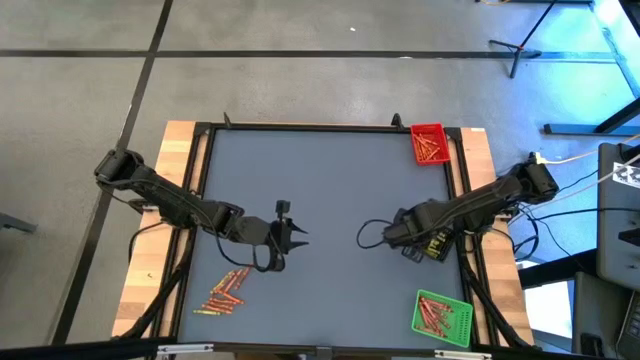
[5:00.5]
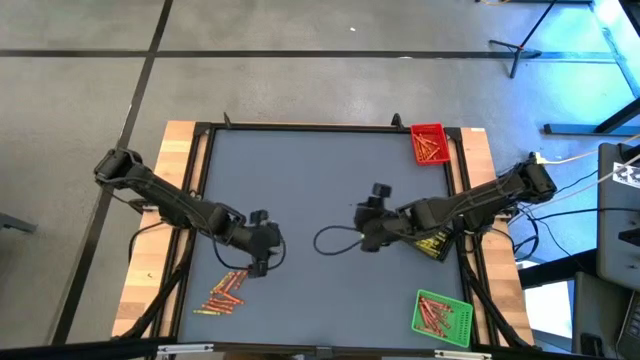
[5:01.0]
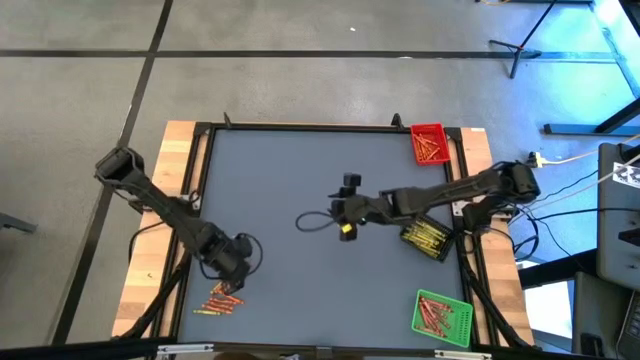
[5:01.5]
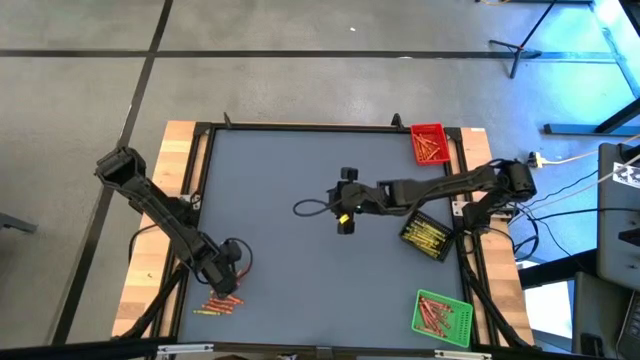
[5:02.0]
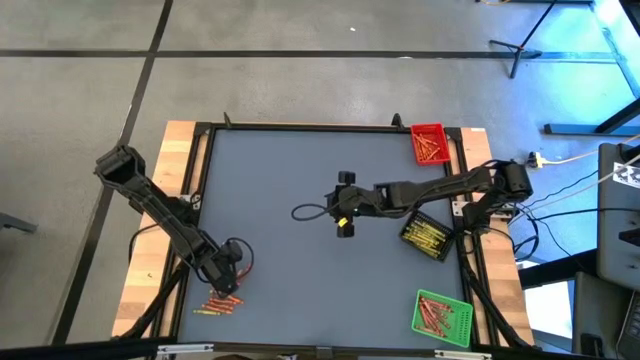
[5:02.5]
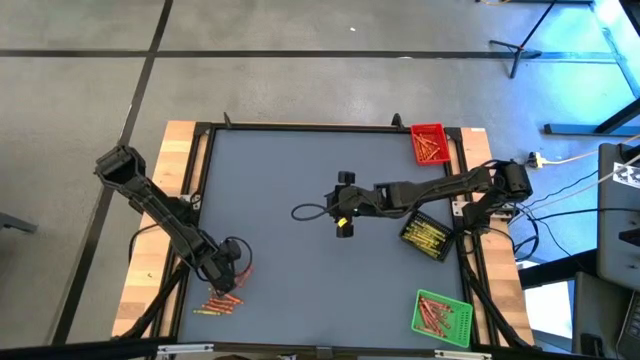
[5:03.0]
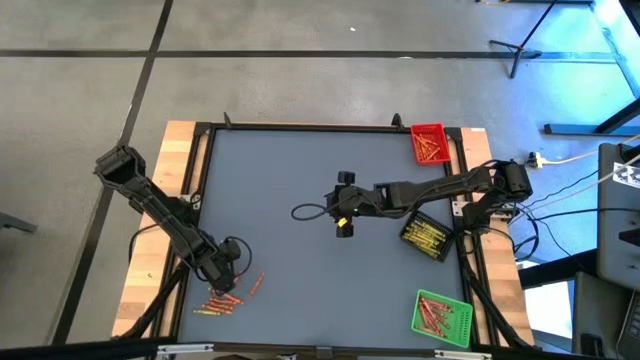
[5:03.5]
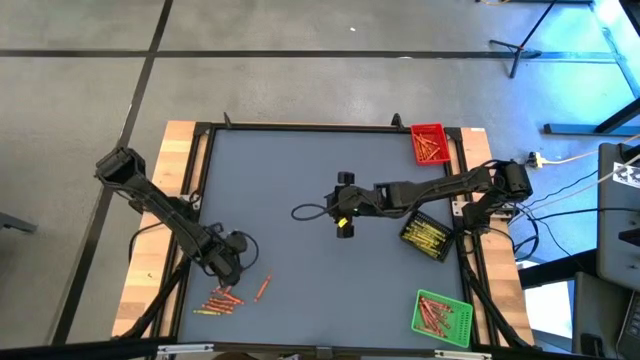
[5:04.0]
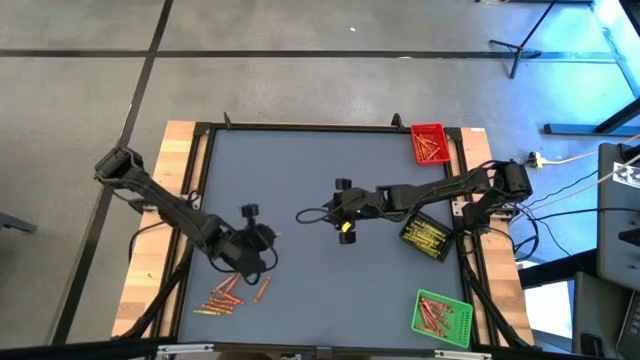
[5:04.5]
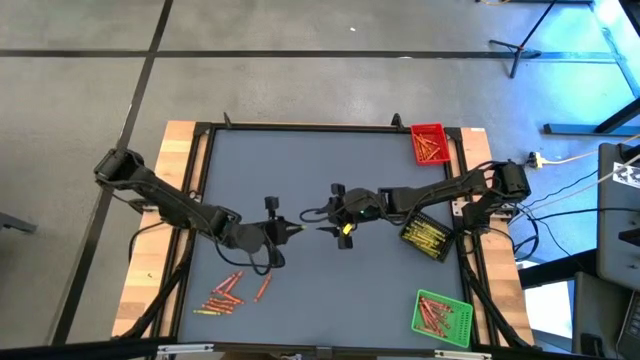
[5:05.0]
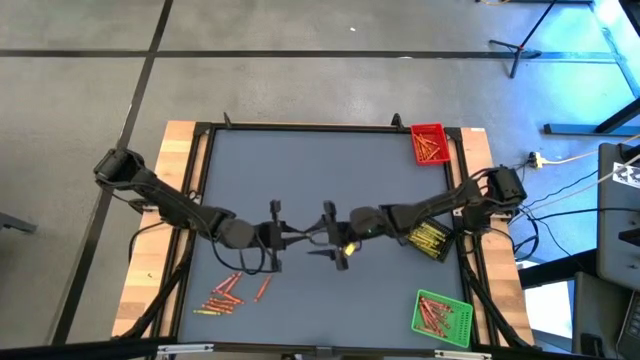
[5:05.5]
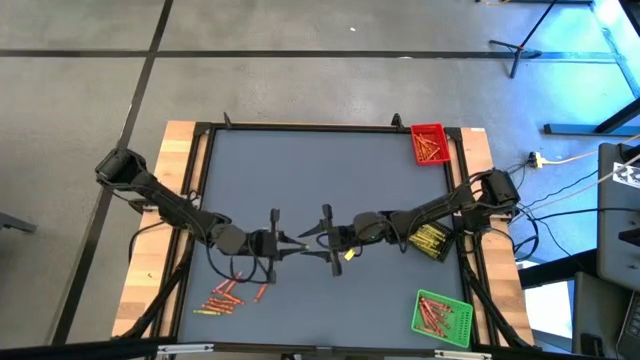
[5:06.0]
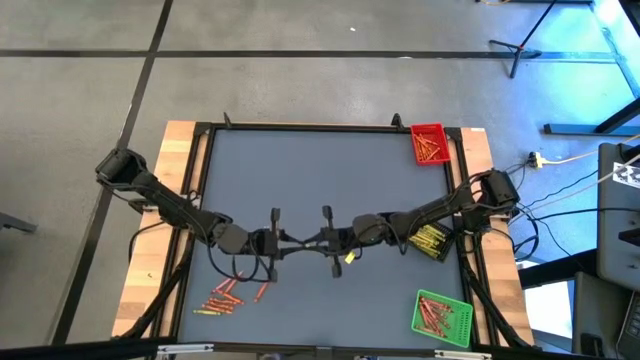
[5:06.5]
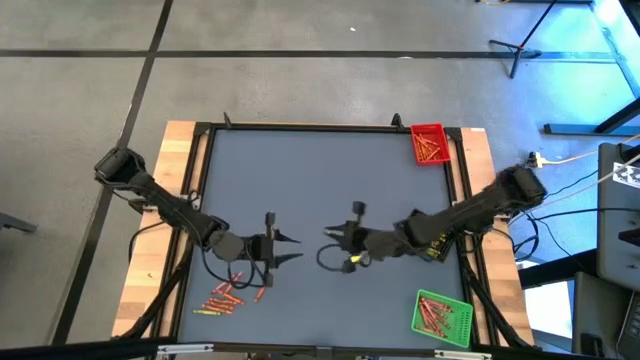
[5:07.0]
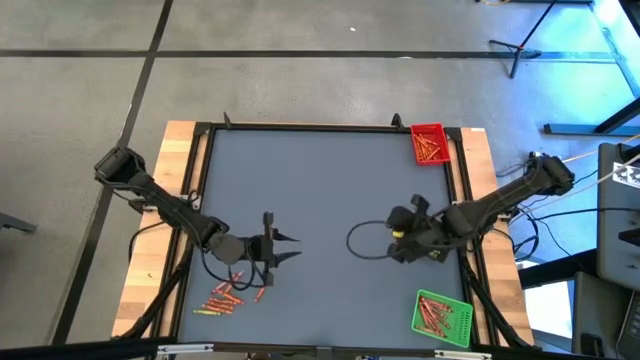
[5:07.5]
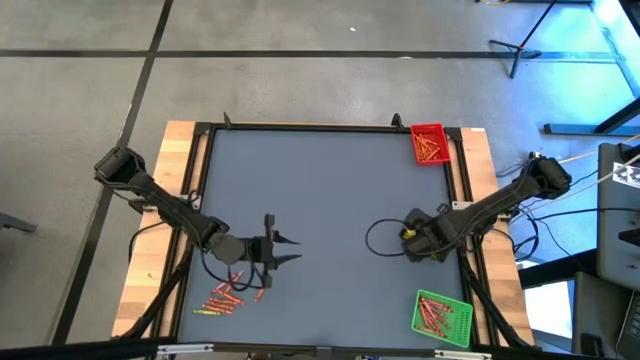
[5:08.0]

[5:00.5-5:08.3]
Task: Sort crayons
Put the yellow green crayon into the black basket

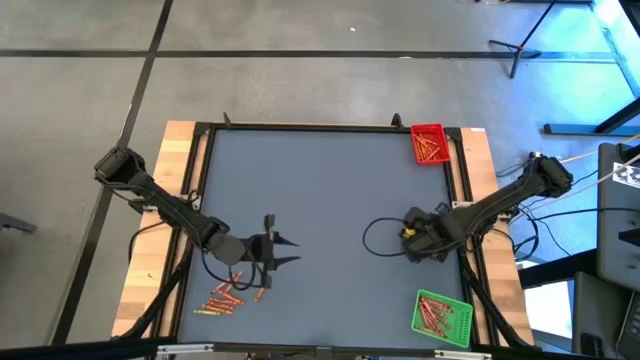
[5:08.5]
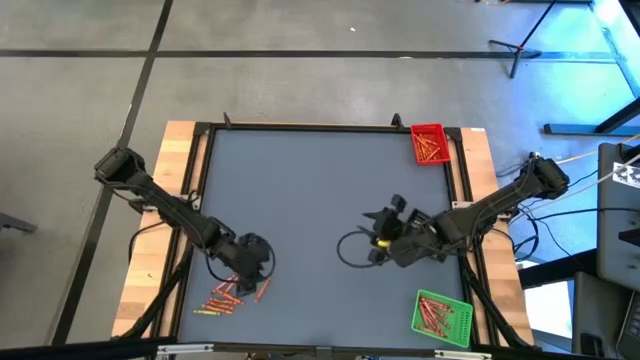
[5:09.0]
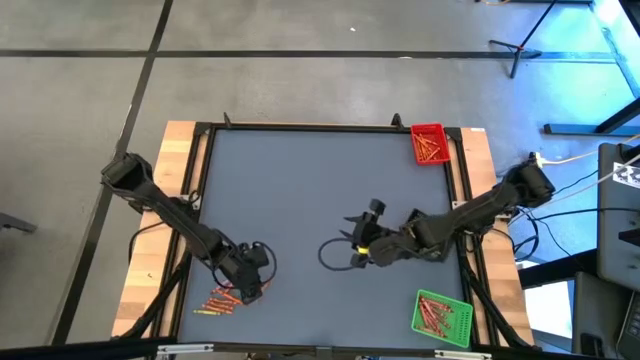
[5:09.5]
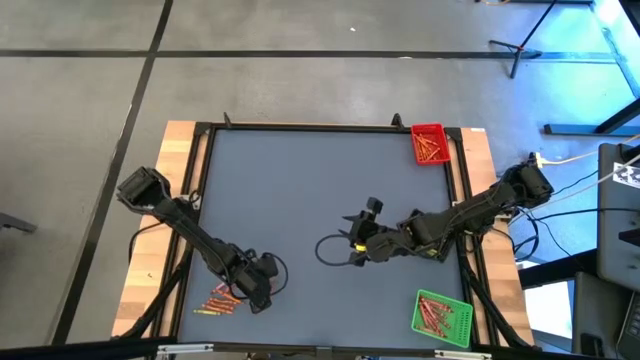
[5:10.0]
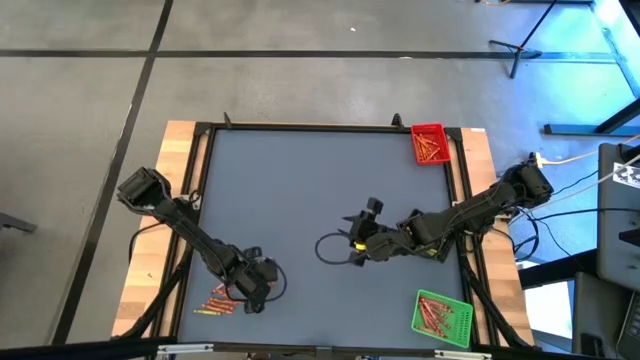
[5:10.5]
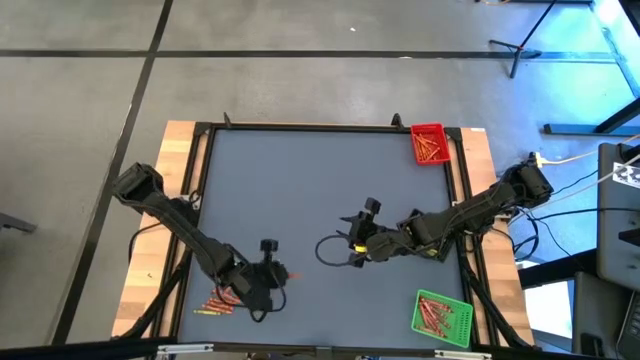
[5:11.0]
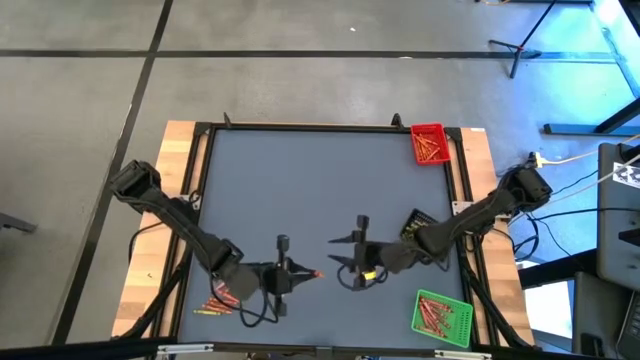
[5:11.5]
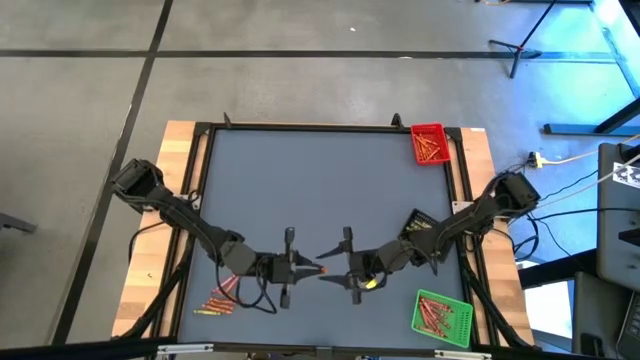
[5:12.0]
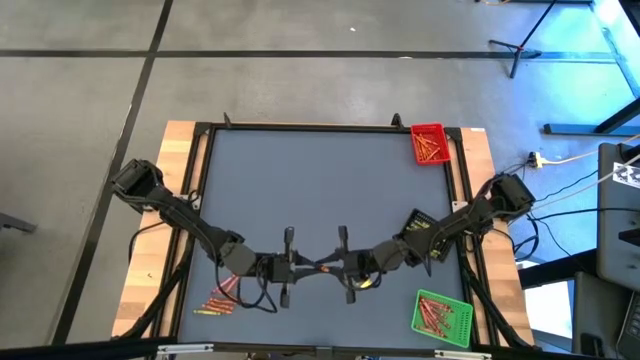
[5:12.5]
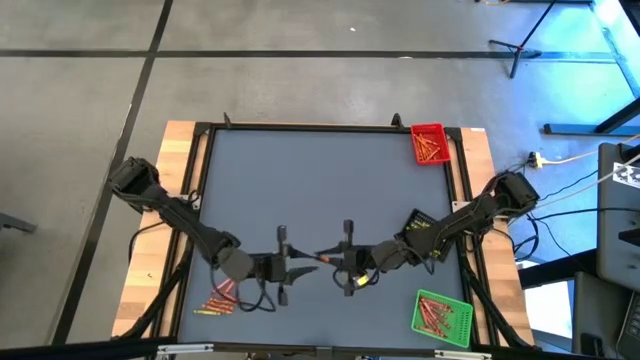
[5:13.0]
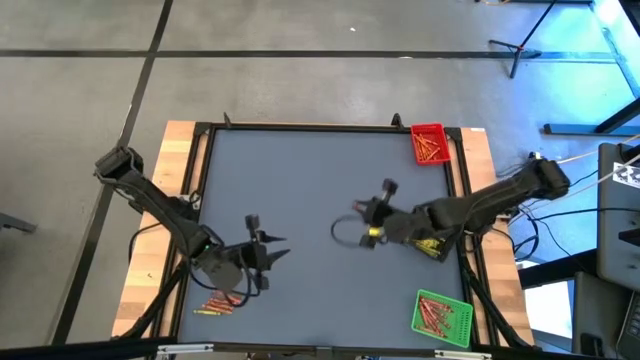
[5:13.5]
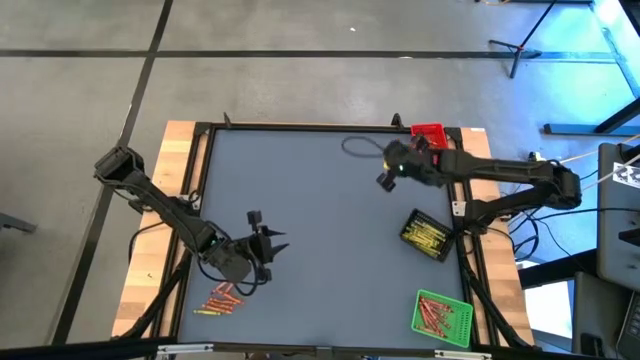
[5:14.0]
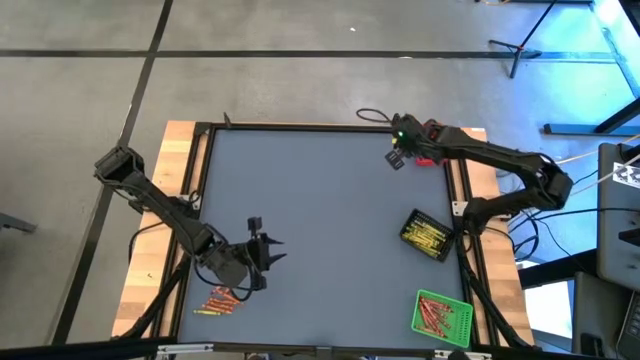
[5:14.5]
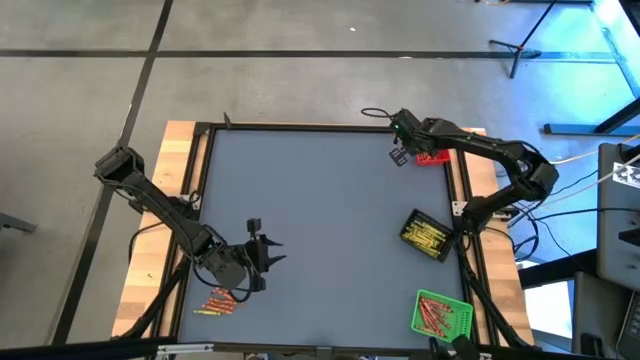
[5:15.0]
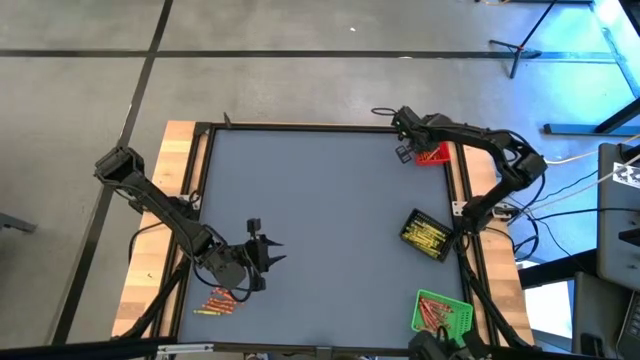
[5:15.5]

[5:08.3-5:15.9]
Put the orange crayon into the red basket

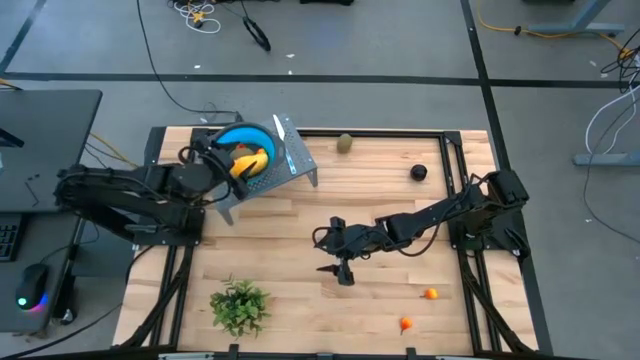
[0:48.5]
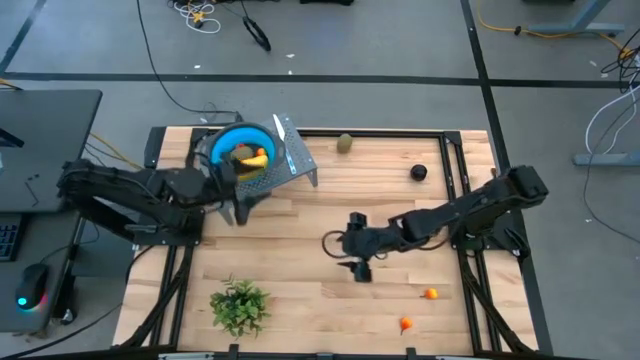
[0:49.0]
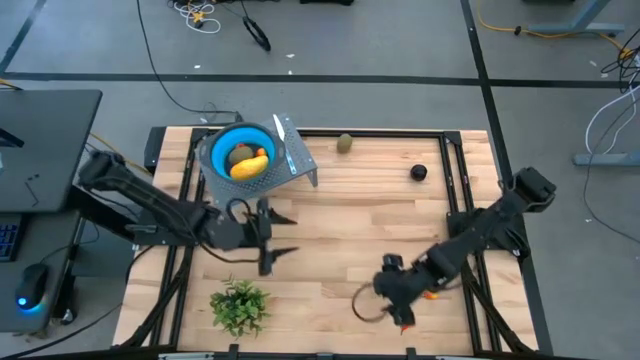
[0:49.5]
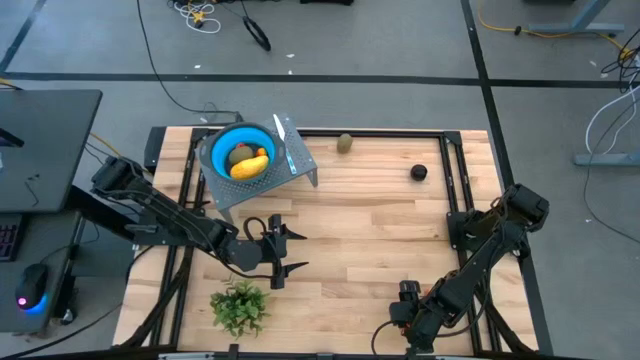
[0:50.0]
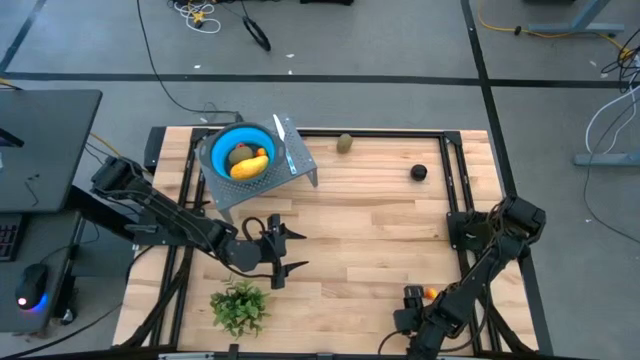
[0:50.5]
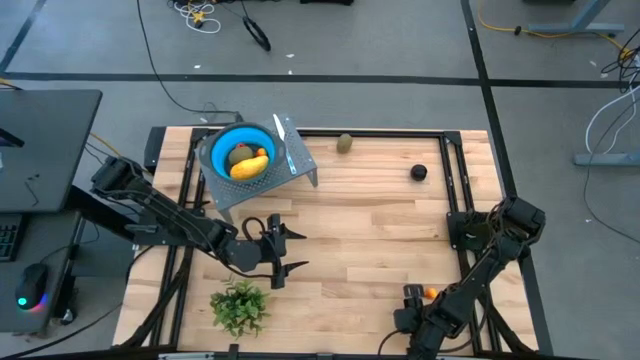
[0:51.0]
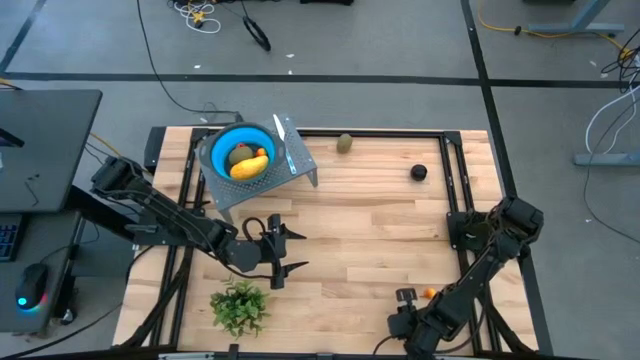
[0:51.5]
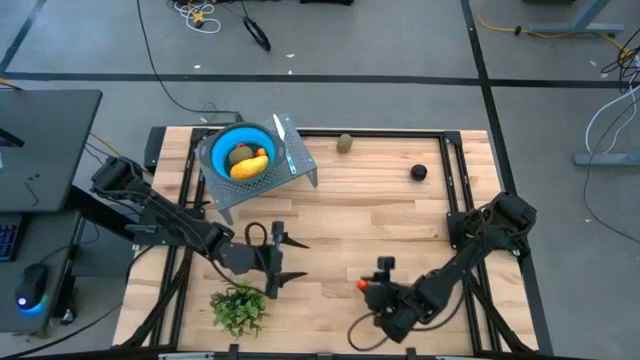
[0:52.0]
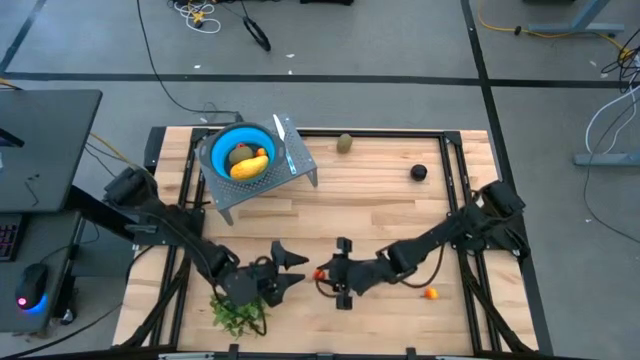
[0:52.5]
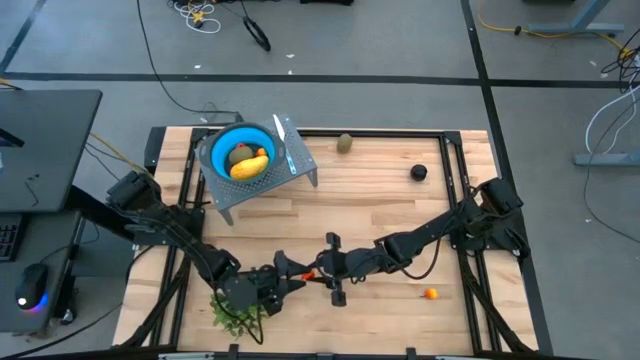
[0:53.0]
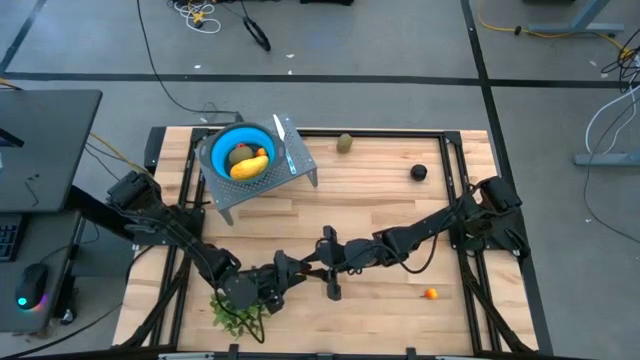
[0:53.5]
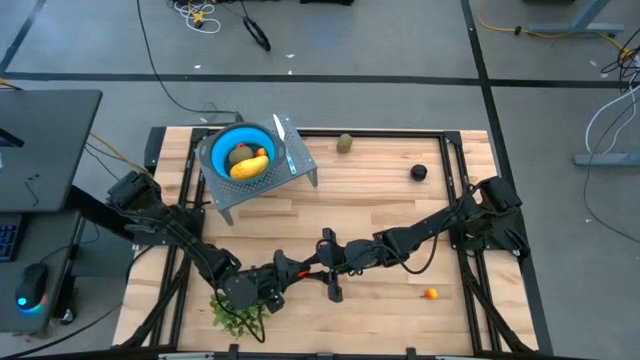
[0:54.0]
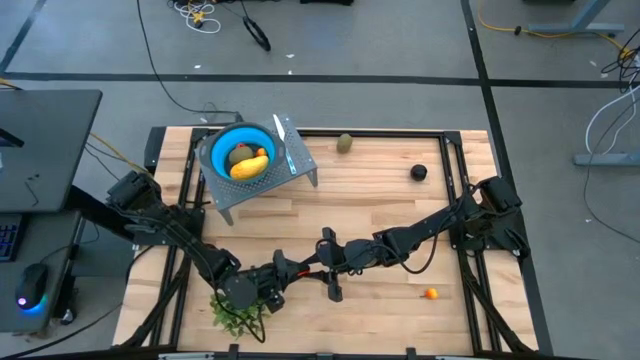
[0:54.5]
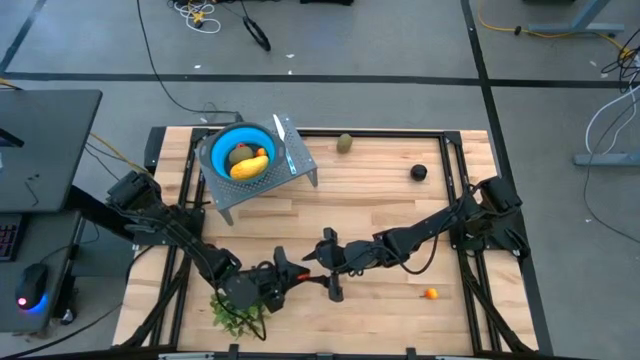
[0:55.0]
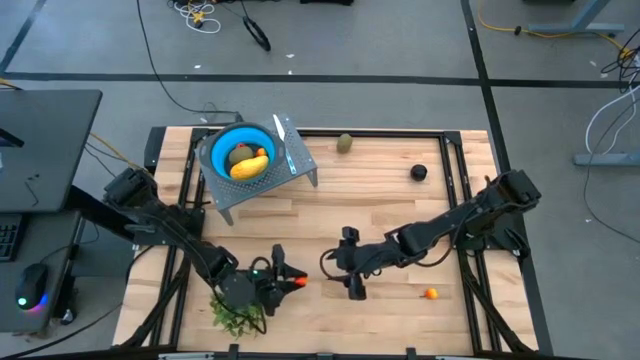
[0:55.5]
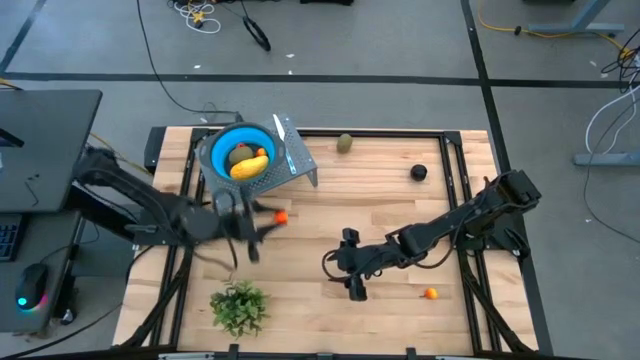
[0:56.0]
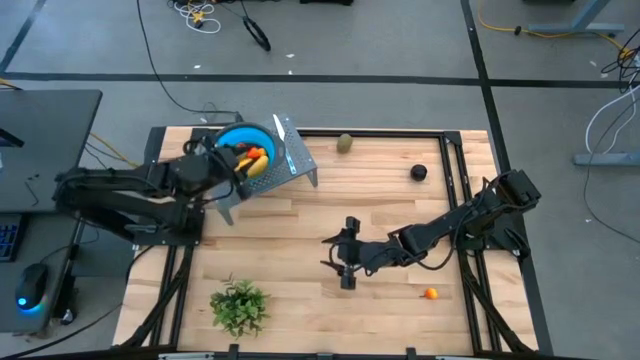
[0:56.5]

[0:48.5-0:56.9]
Task: Pick & Place Fruit
Put the bottom orange pear into the blue strainer bowl on the shelf
